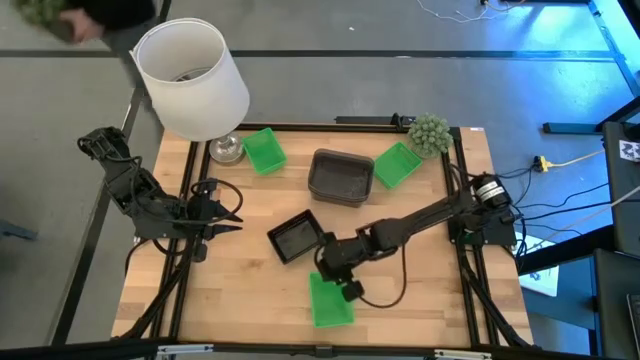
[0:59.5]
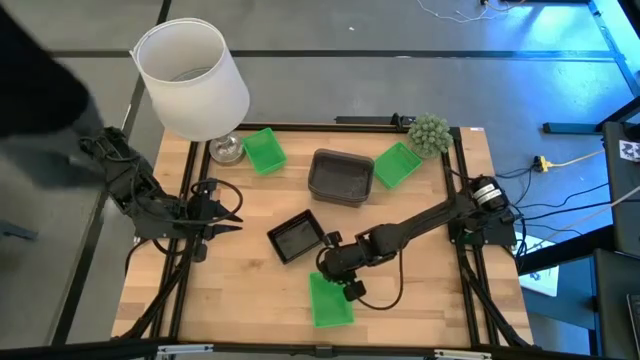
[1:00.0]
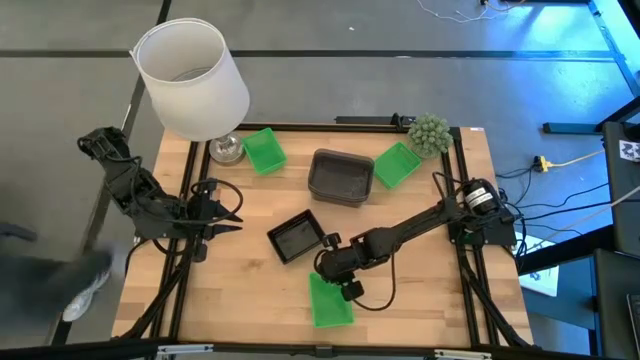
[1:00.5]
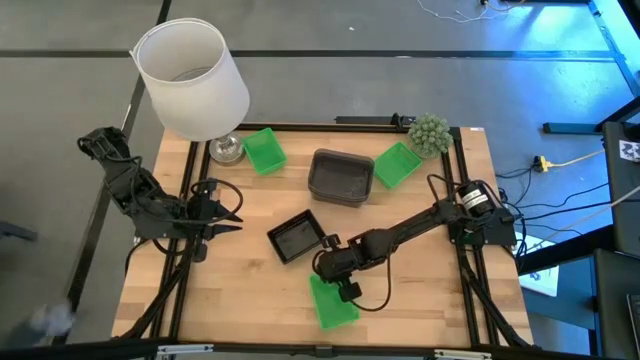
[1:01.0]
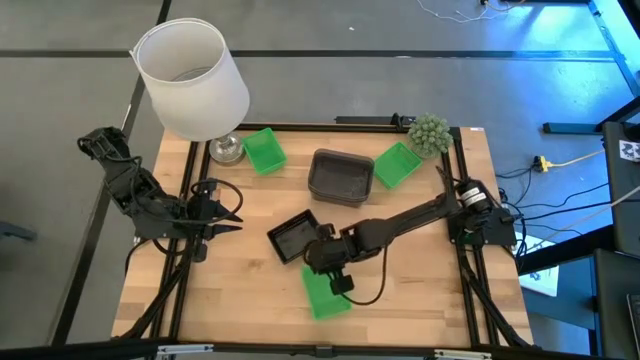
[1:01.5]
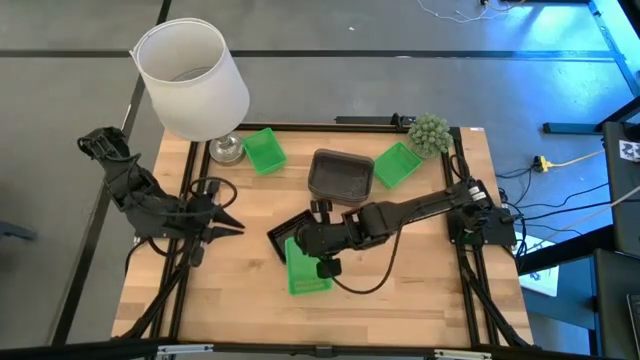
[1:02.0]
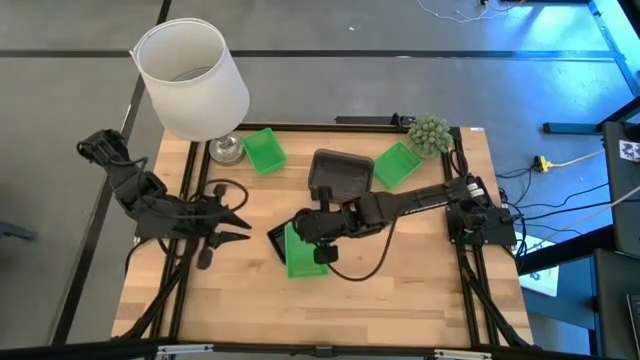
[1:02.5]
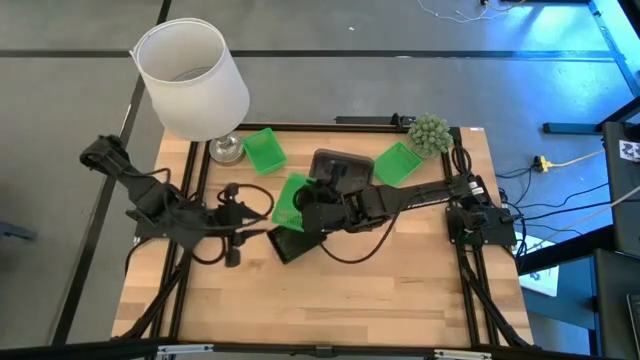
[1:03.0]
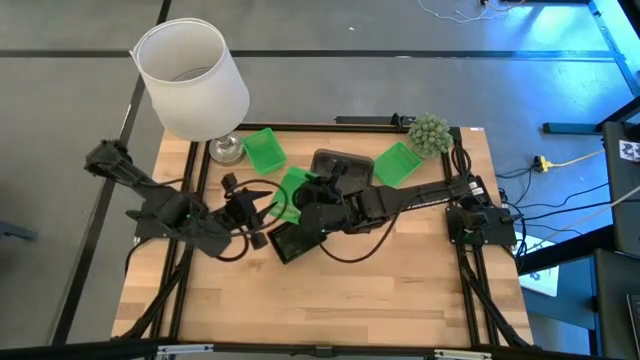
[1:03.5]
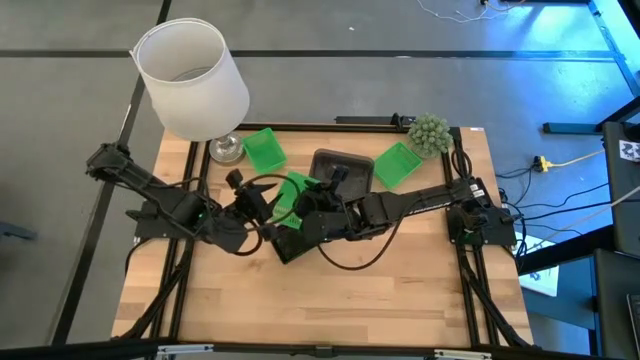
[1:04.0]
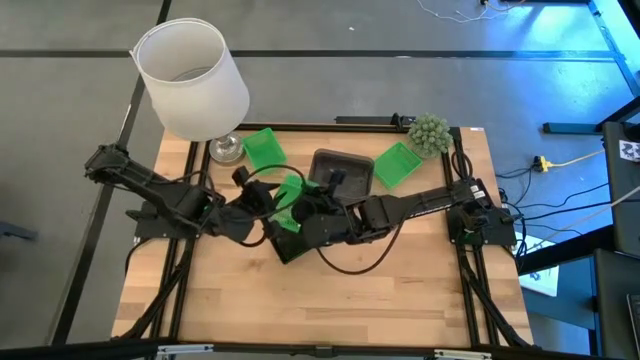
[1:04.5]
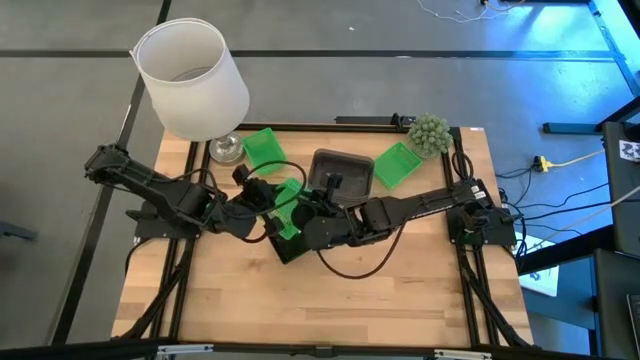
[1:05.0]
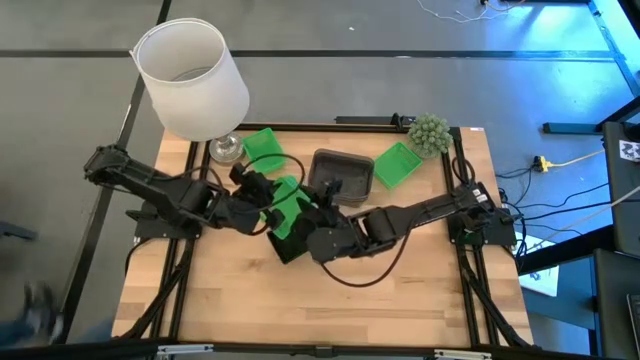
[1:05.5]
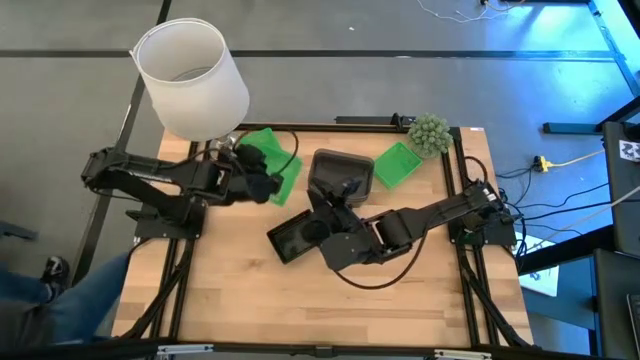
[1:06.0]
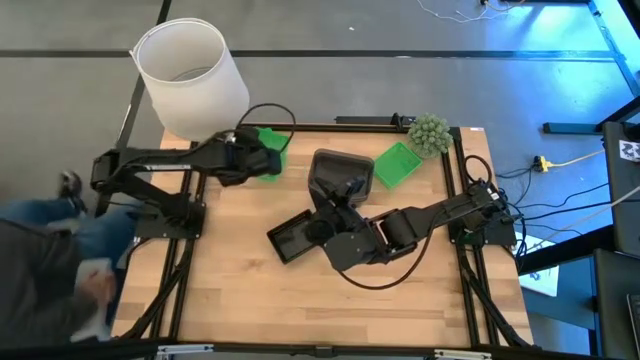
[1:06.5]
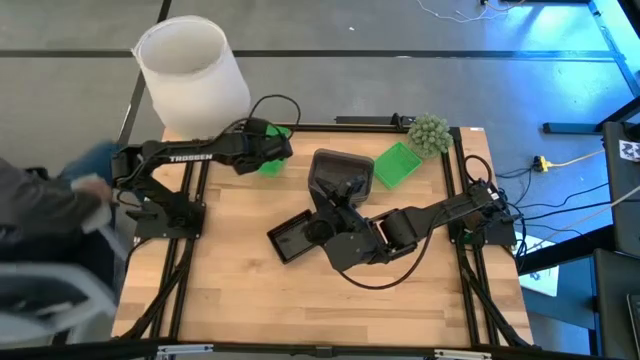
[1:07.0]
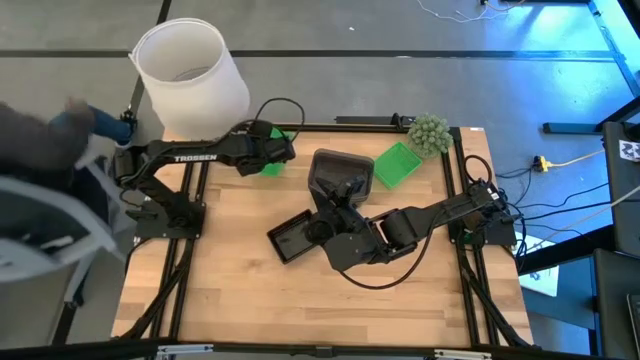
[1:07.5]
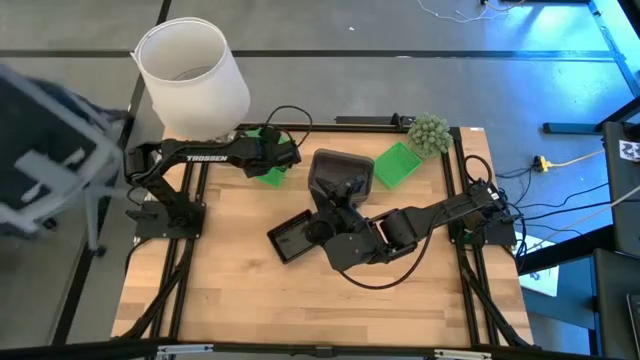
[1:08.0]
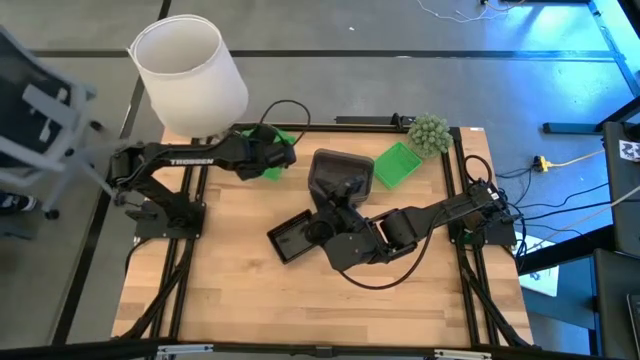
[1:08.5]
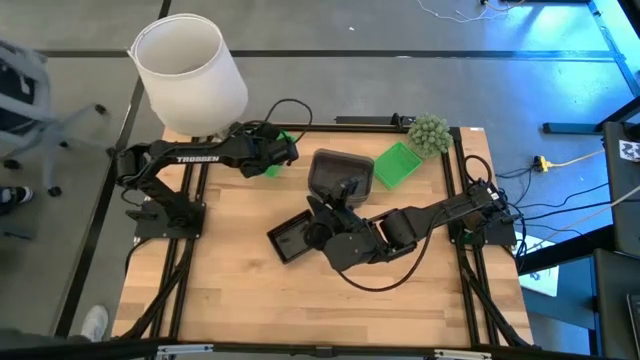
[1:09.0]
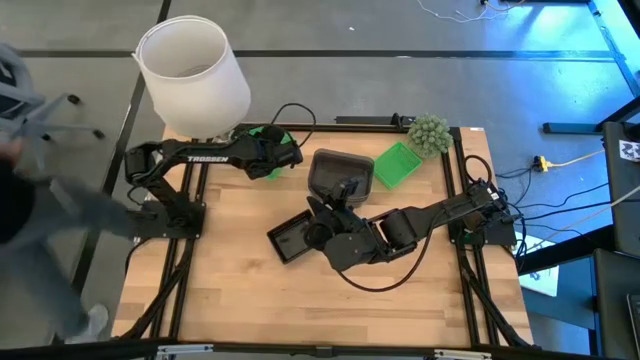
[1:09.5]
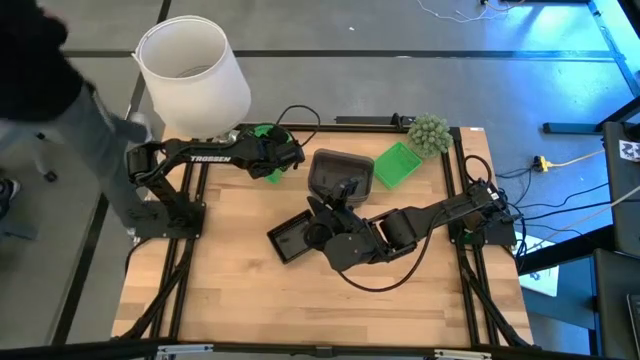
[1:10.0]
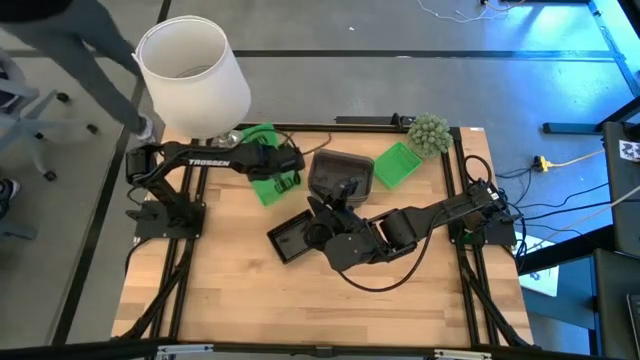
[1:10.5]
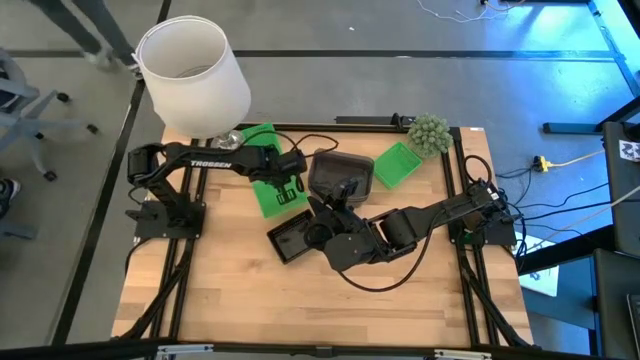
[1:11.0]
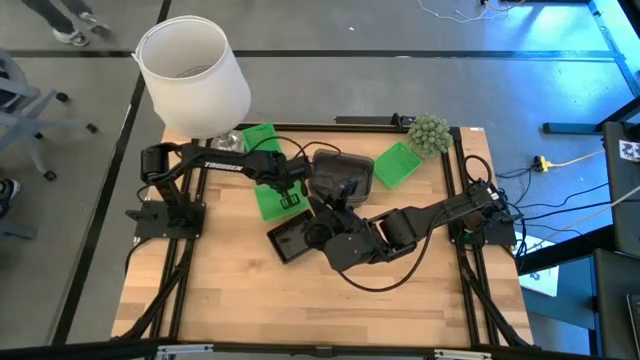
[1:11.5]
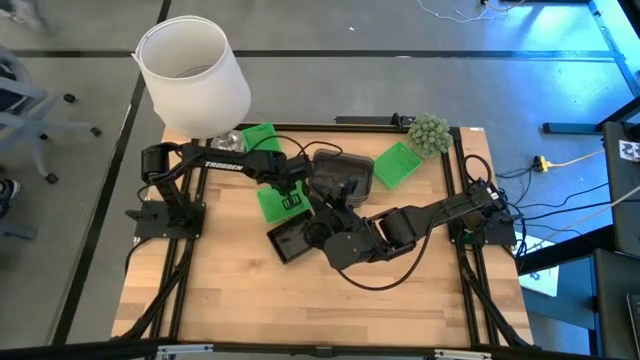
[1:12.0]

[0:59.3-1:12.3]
Move the bottom green basket to the top of the table

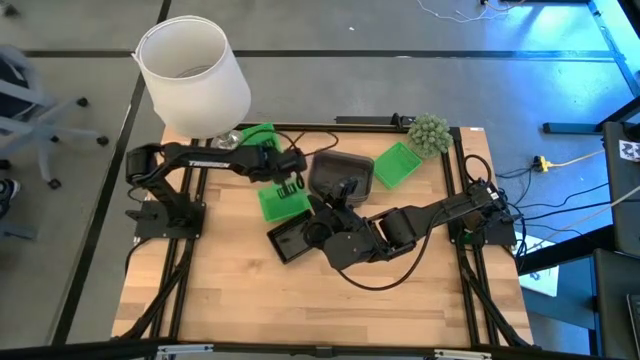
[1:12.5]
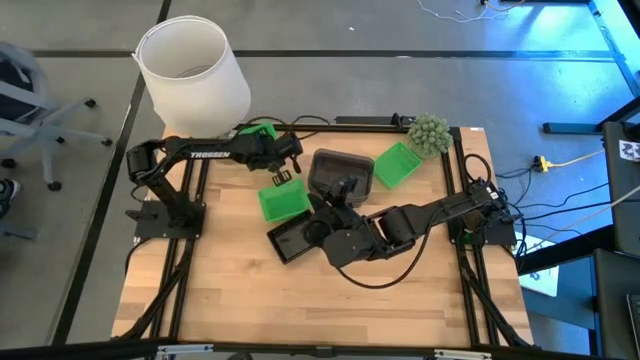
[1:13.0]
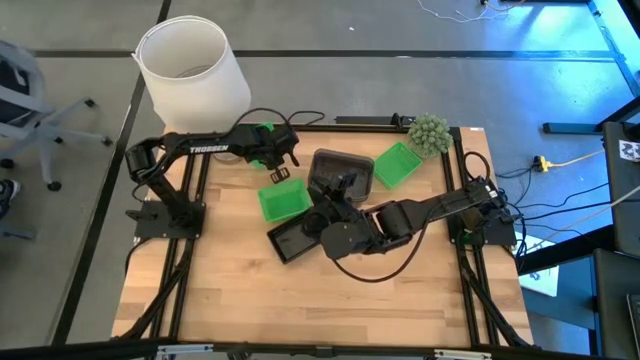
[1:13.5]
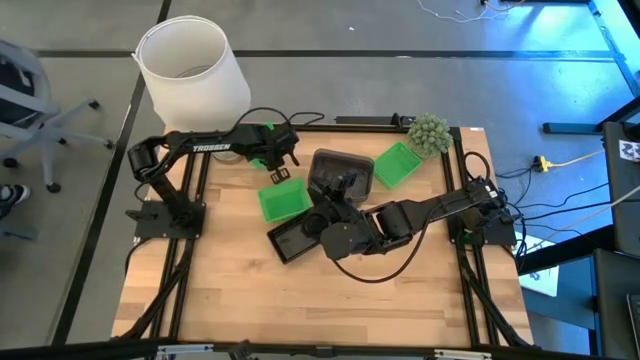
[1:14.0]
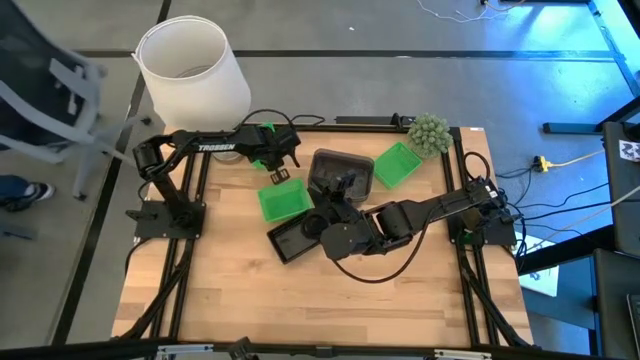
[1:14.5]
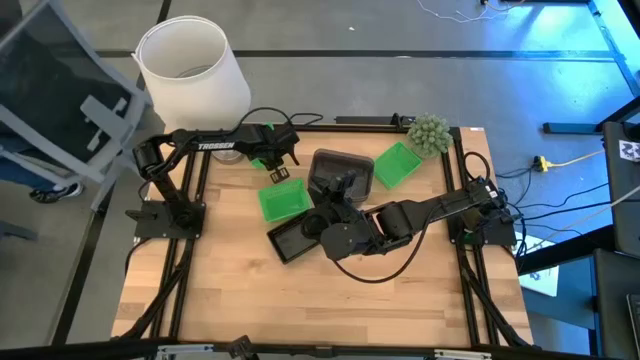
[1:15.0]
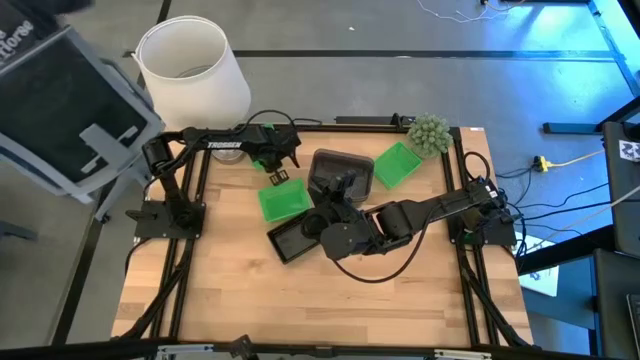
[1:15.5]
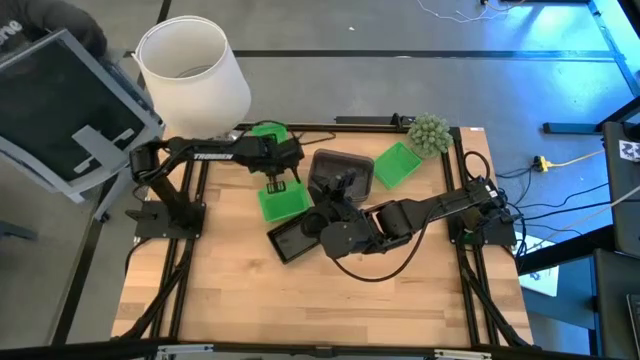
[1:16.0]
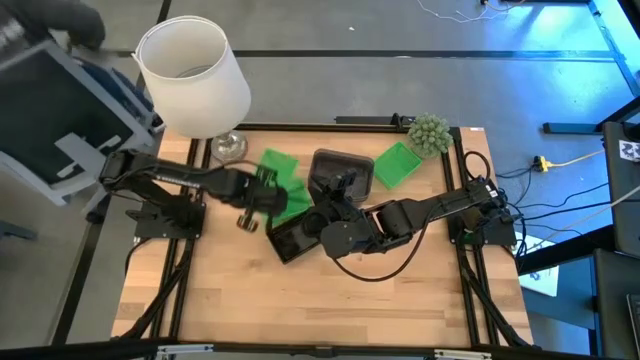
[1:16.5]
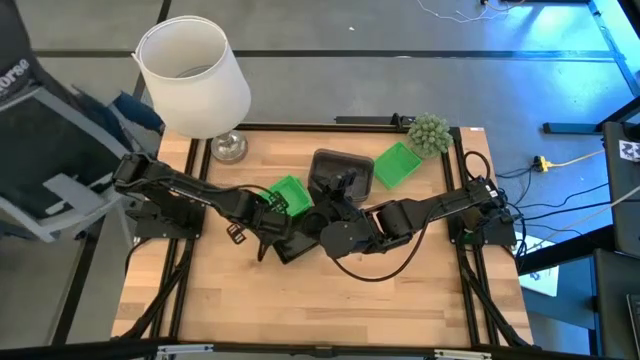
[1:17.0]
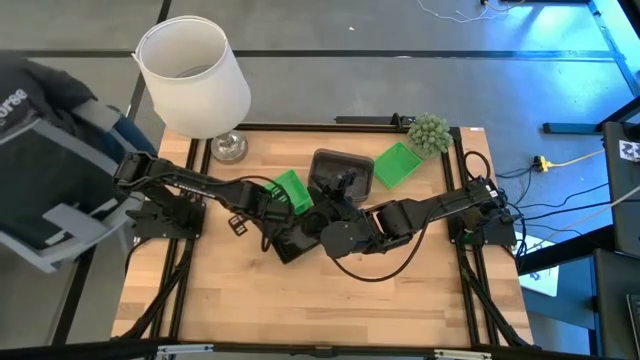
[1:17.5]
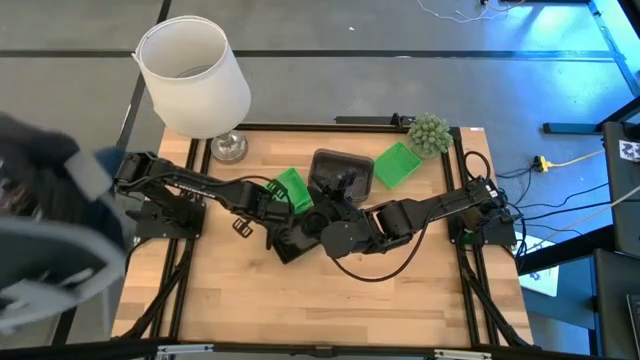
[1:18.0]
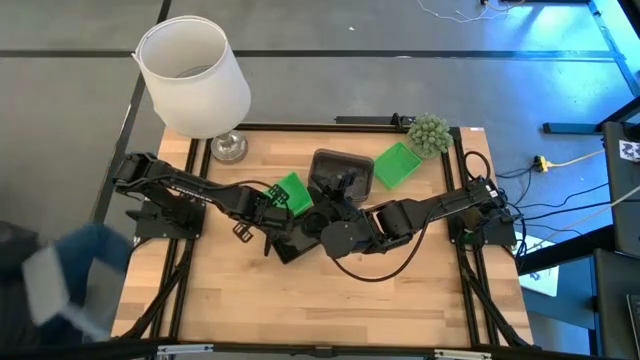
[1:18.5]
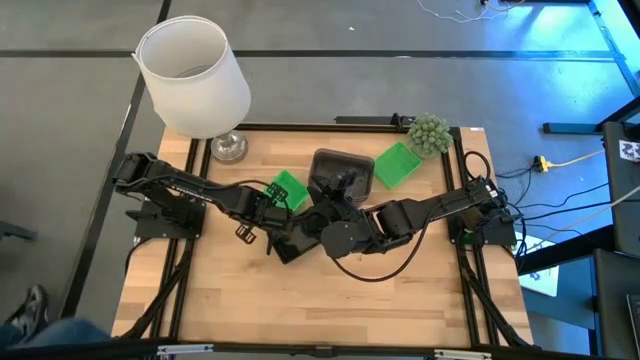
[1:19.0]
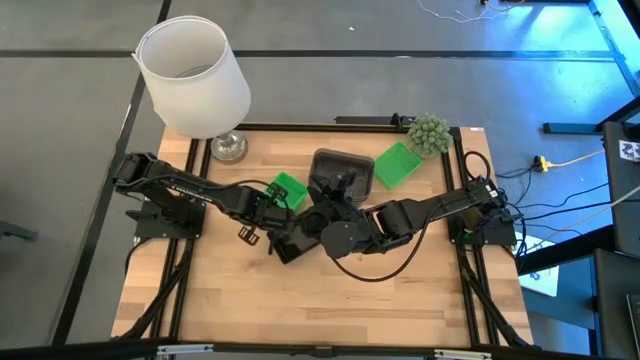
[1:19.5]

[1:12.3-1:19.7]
Stack the left green basket on top of the middle green basket
